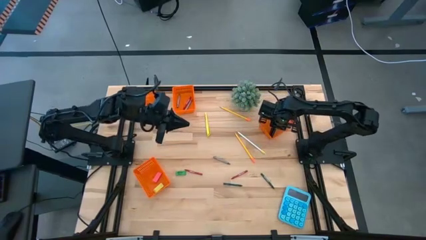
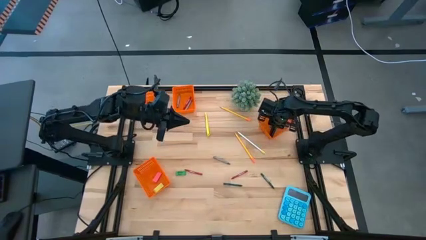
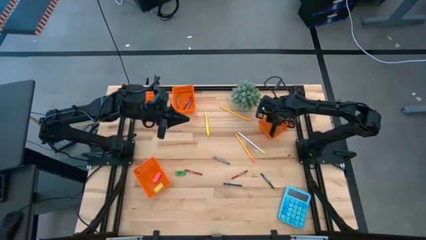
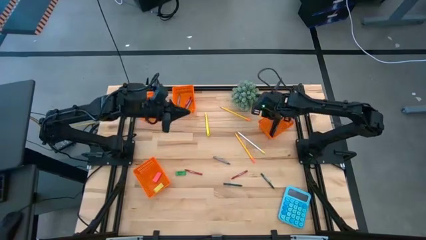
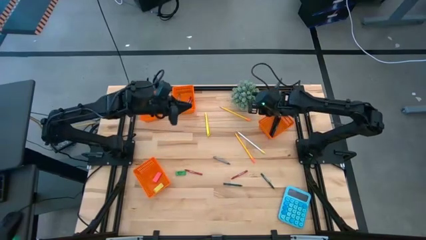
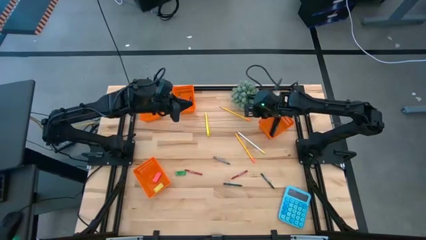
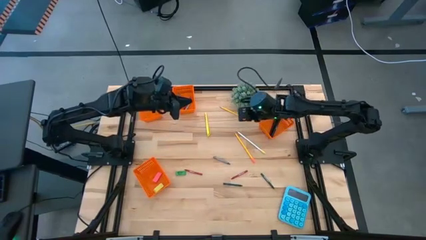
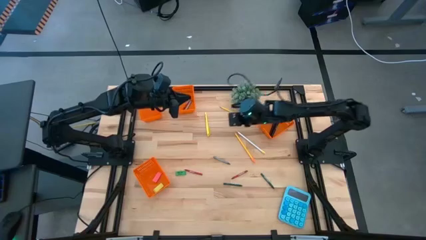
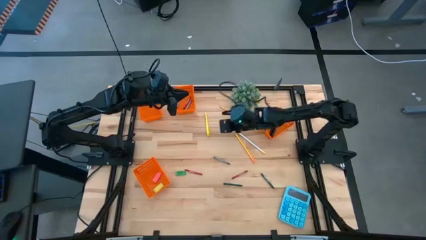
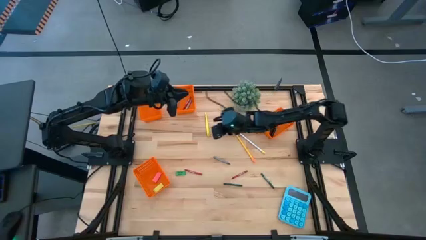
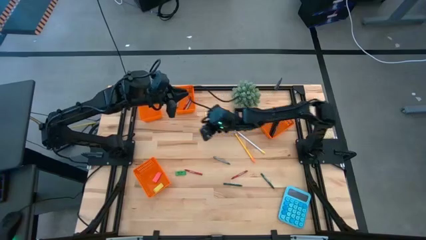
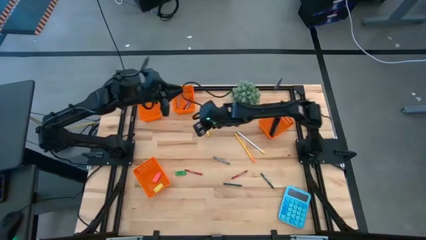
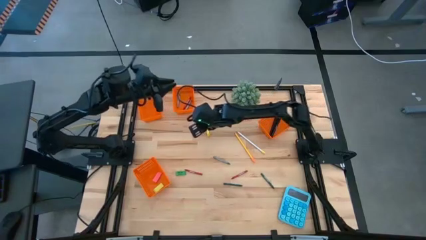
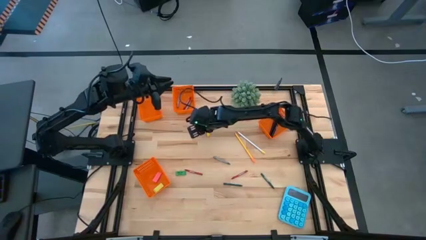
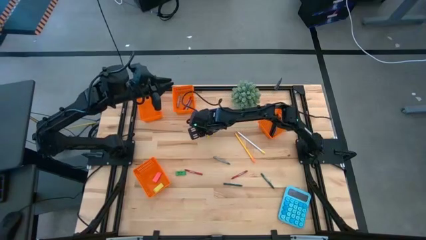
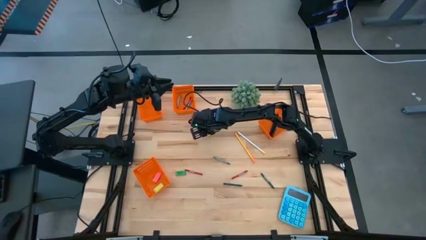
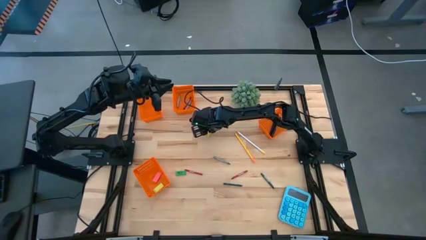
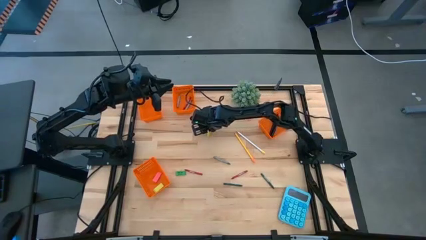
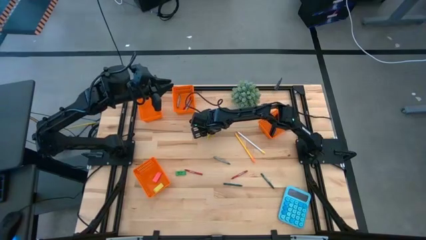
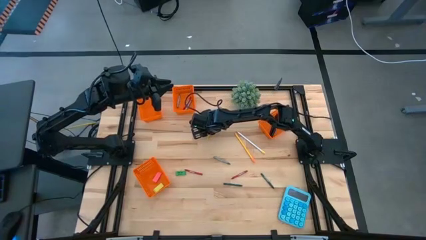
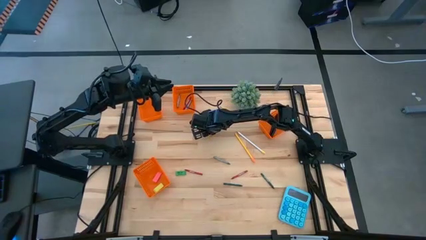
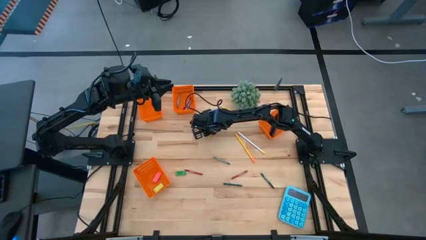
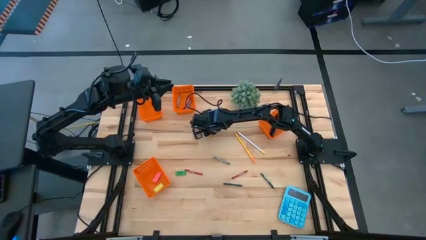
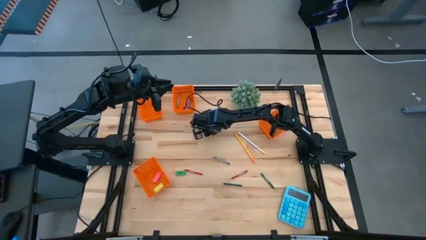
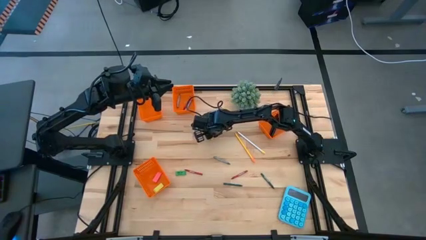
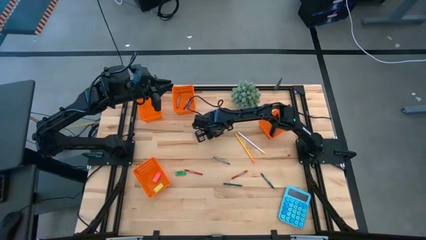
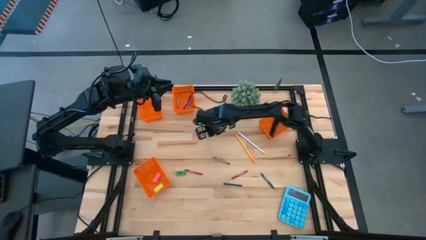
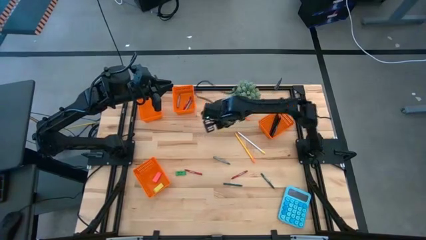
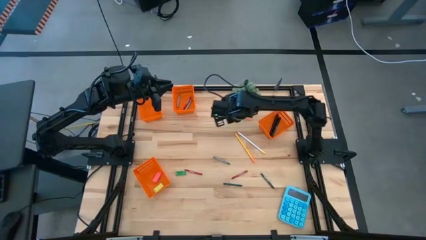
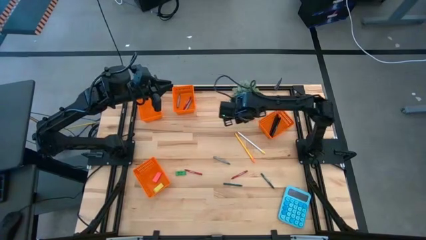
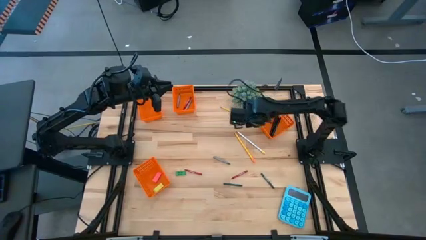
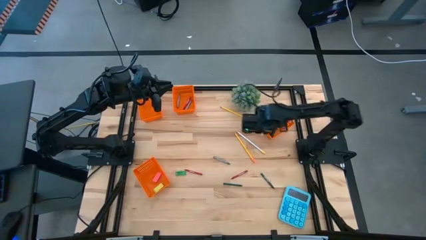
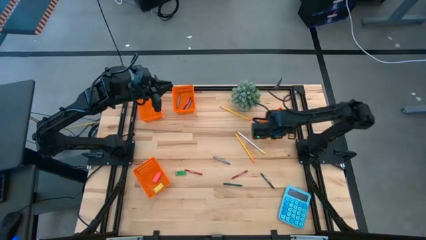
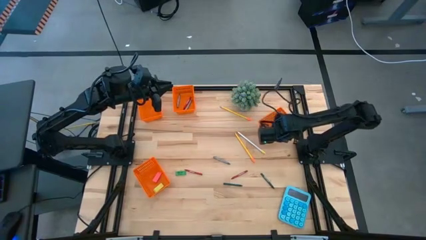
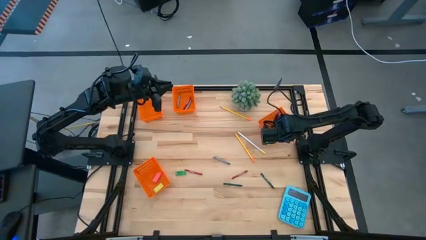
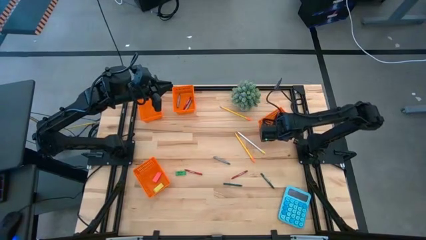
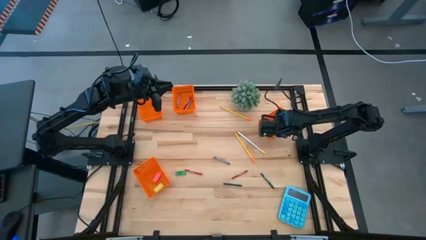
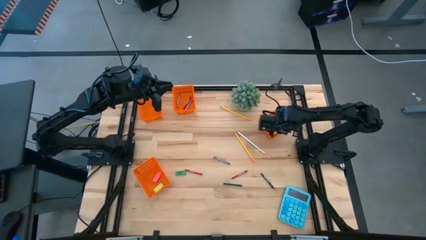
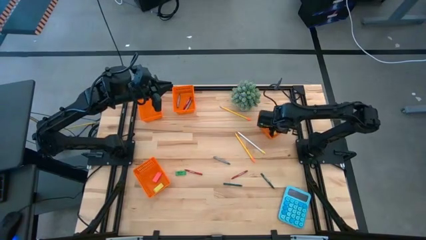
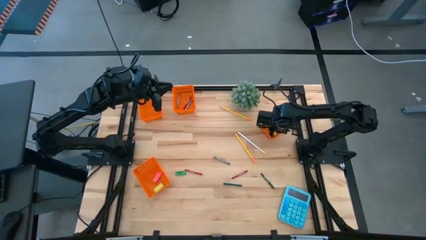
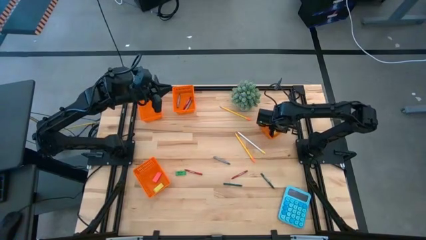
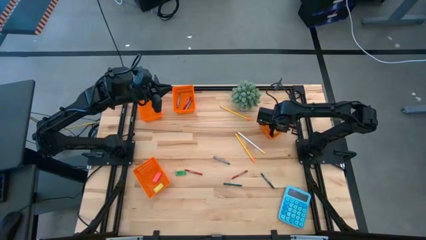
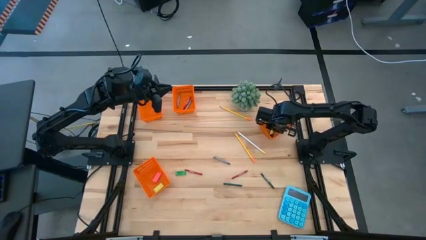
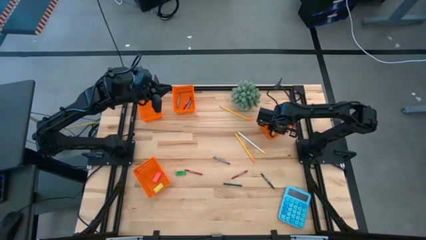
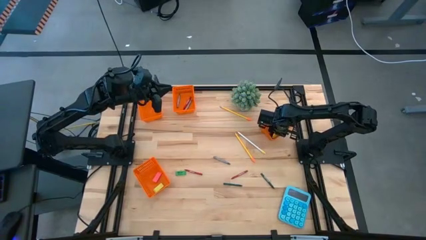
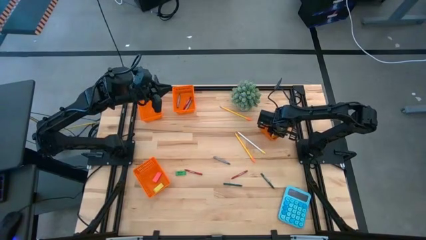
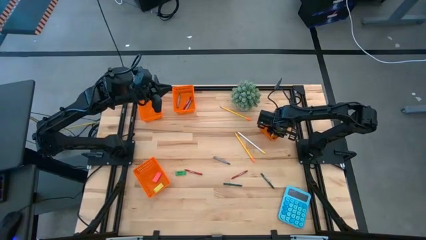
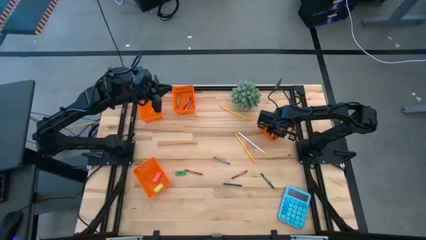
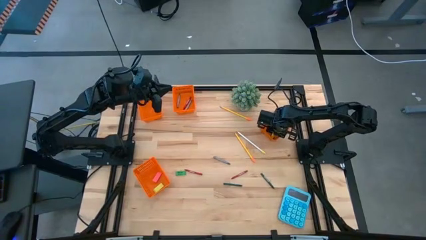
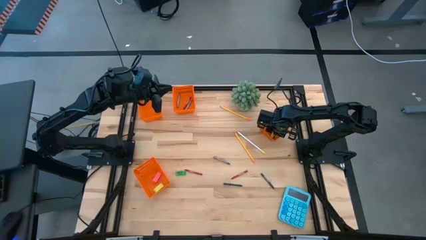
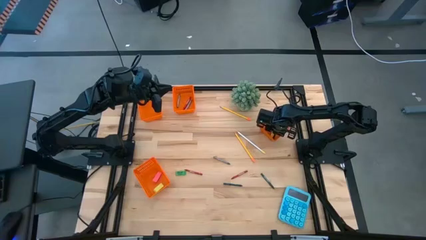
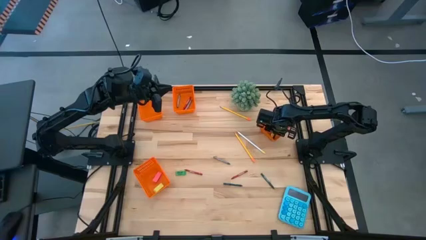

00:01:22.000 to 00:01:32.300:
Task: Sort crayons/erasers/pens/pencils in bins
Put the yellow highlighter into the right orange bin
